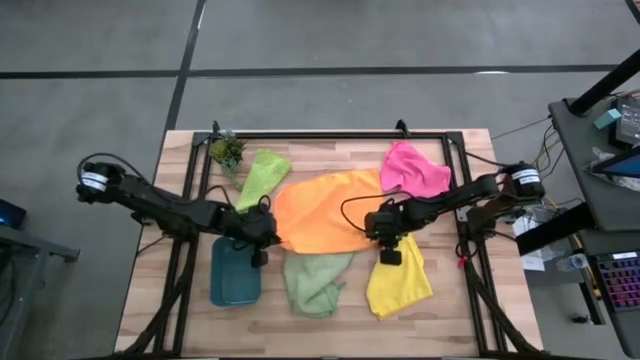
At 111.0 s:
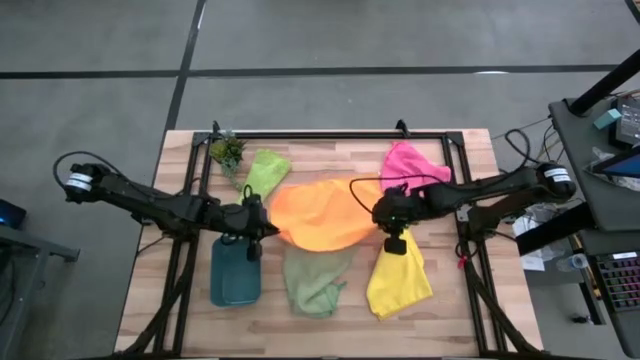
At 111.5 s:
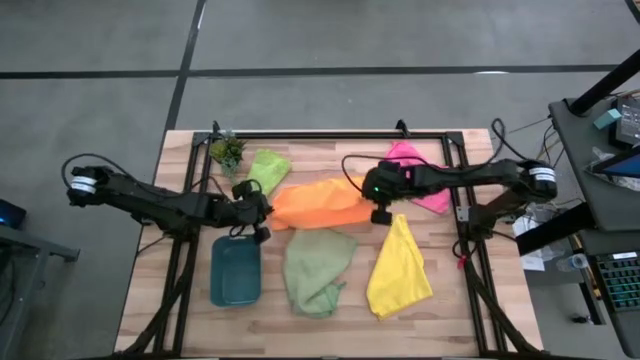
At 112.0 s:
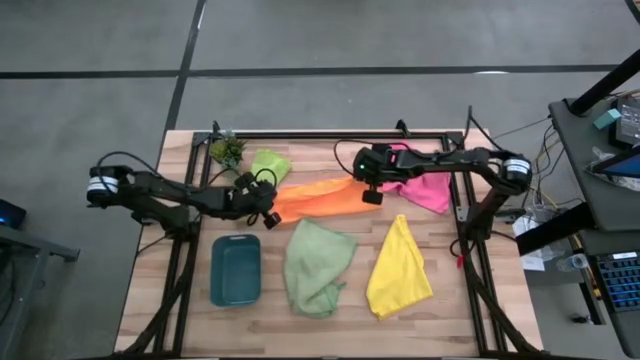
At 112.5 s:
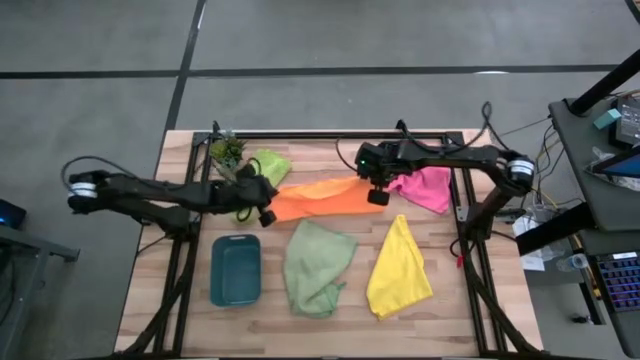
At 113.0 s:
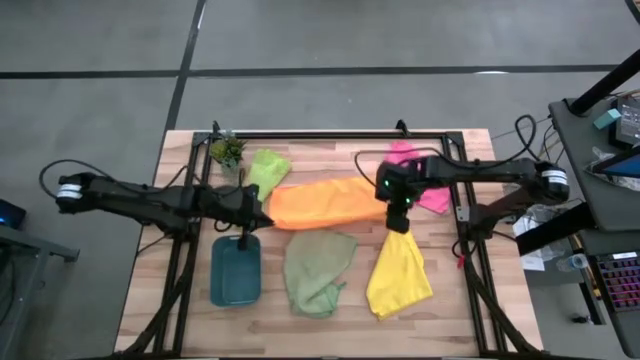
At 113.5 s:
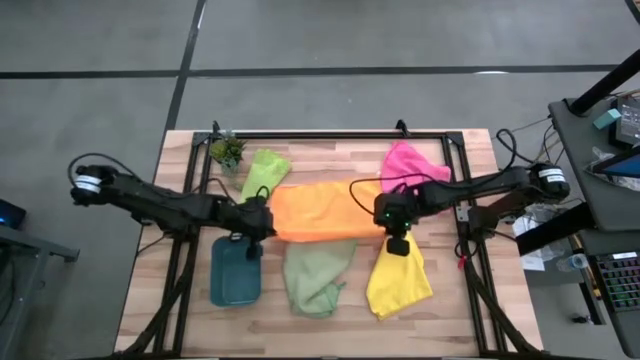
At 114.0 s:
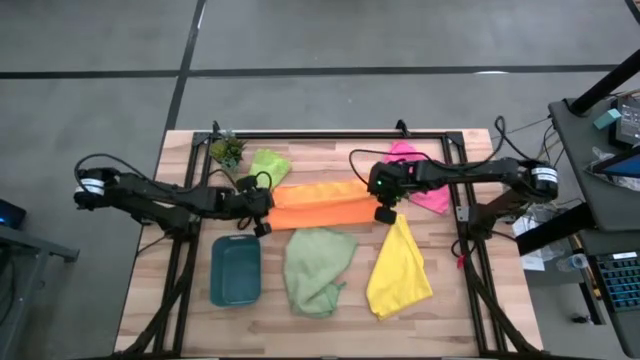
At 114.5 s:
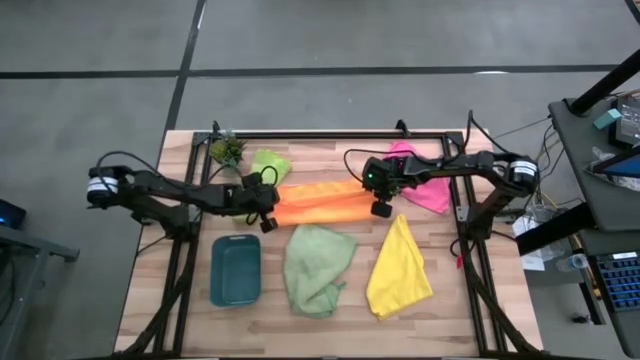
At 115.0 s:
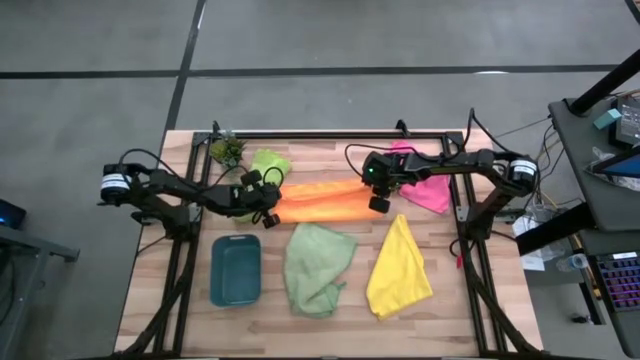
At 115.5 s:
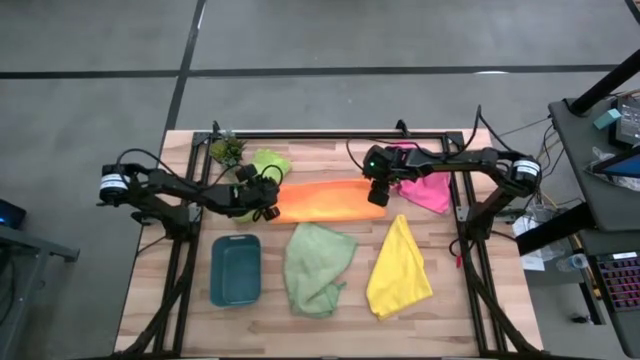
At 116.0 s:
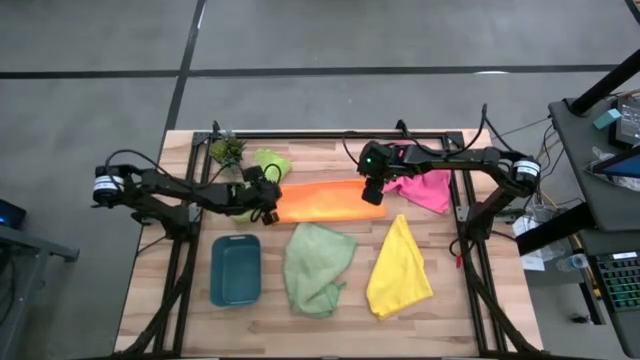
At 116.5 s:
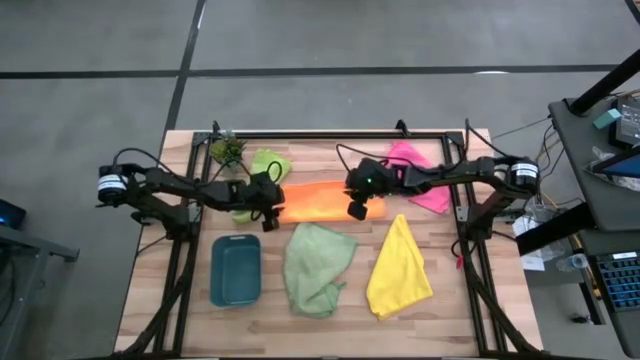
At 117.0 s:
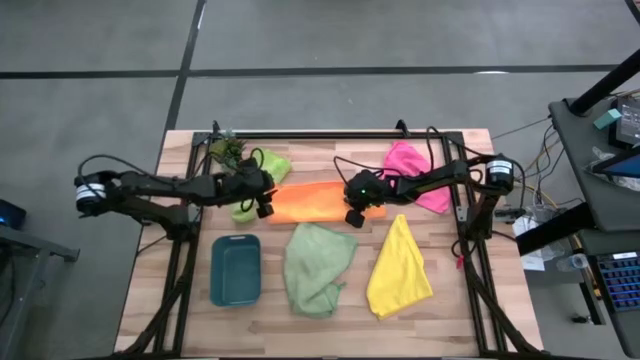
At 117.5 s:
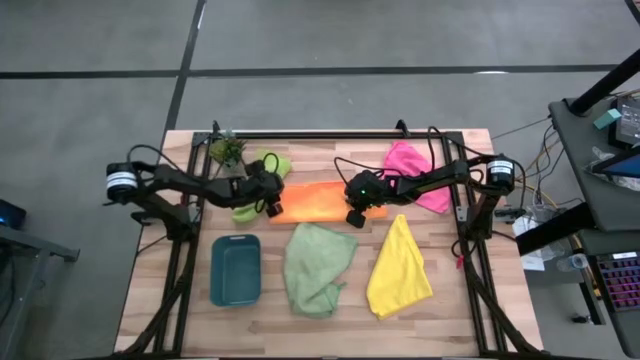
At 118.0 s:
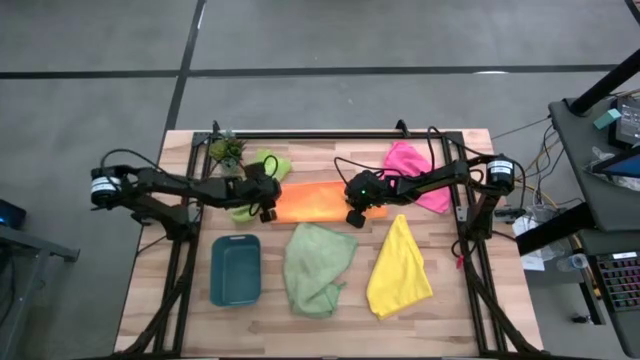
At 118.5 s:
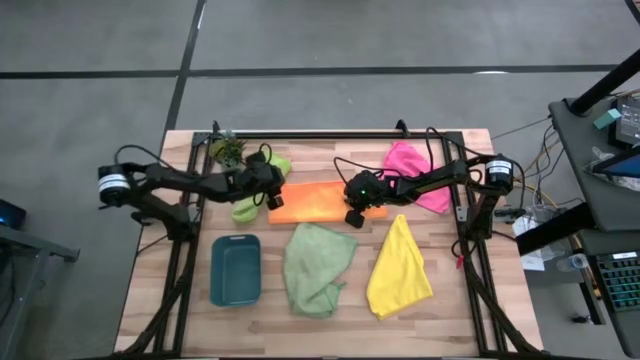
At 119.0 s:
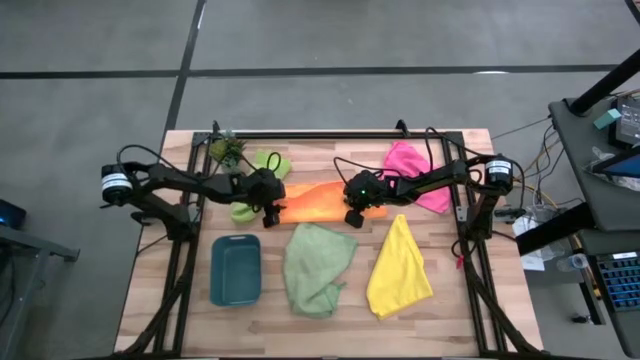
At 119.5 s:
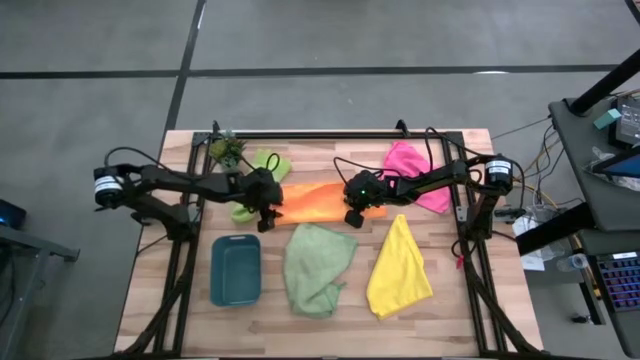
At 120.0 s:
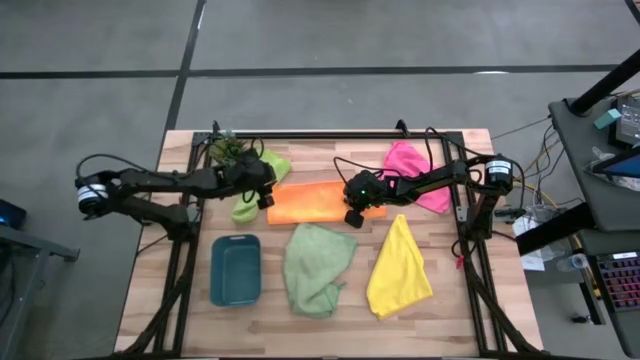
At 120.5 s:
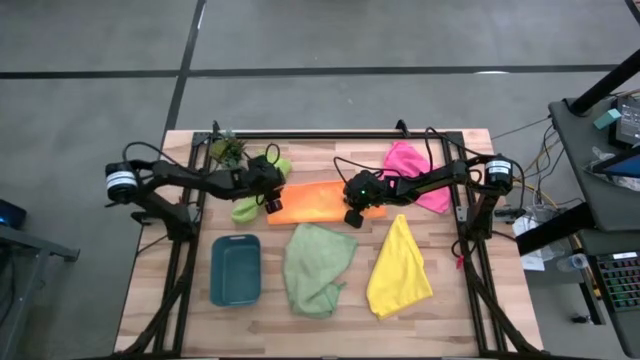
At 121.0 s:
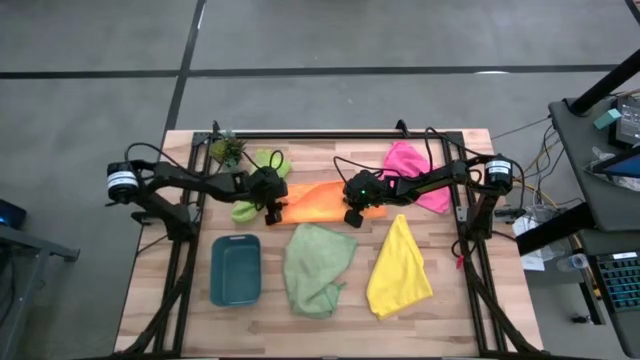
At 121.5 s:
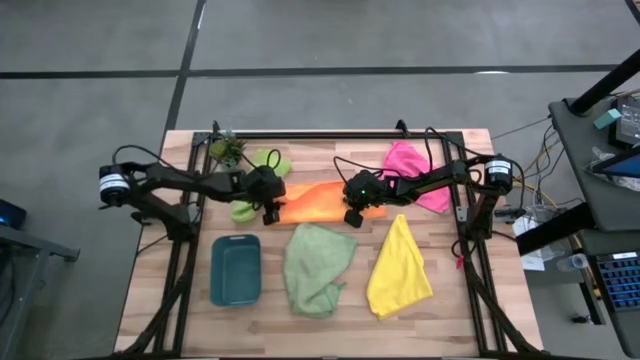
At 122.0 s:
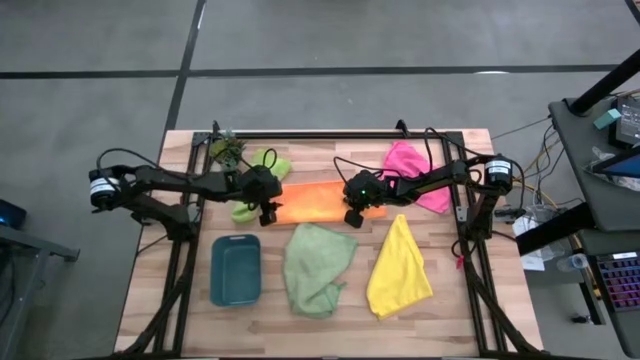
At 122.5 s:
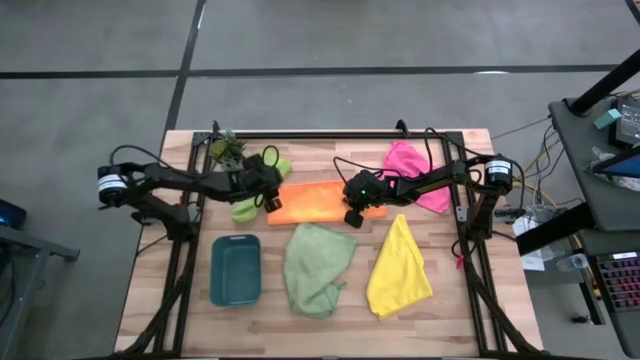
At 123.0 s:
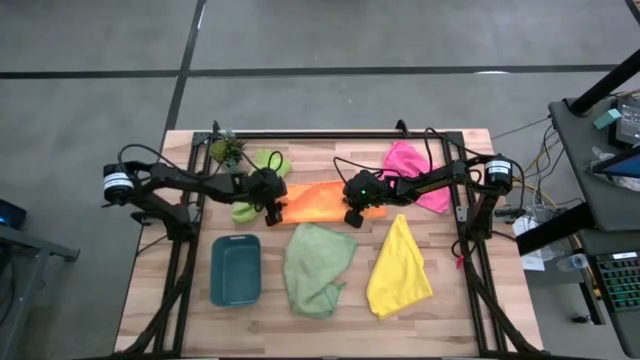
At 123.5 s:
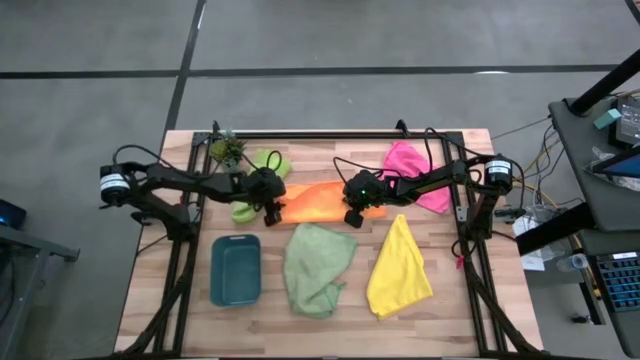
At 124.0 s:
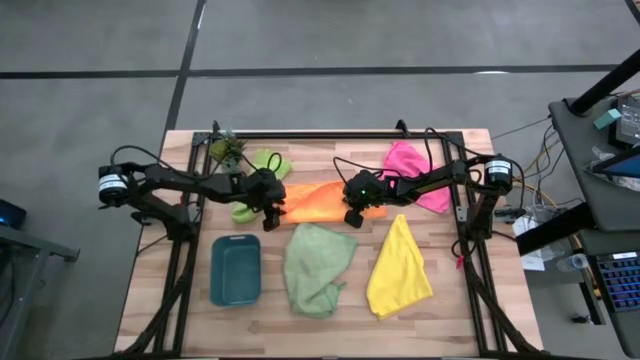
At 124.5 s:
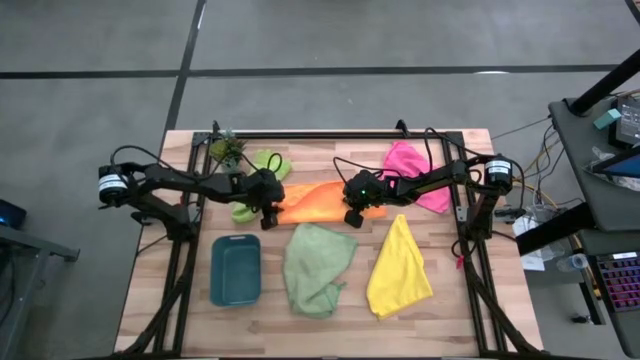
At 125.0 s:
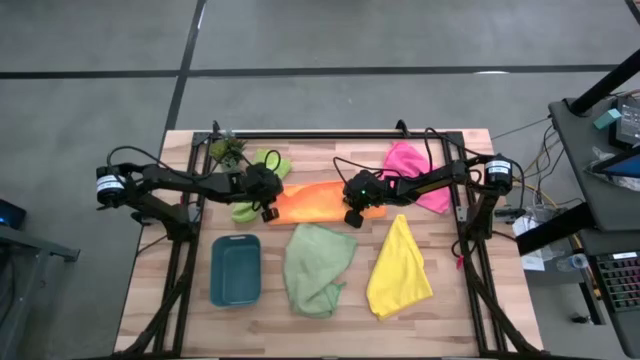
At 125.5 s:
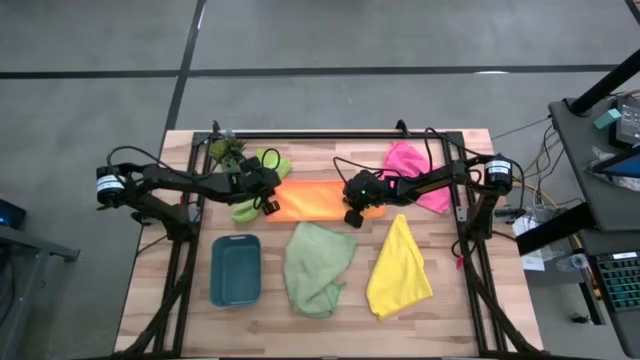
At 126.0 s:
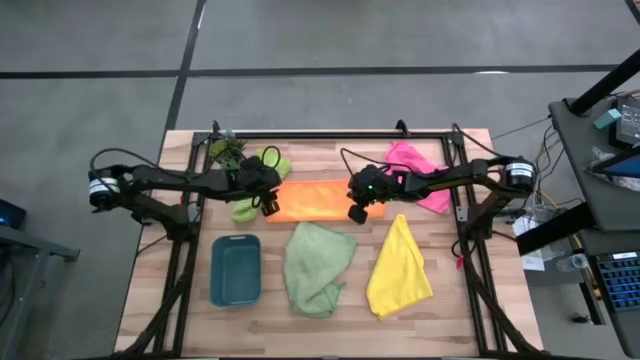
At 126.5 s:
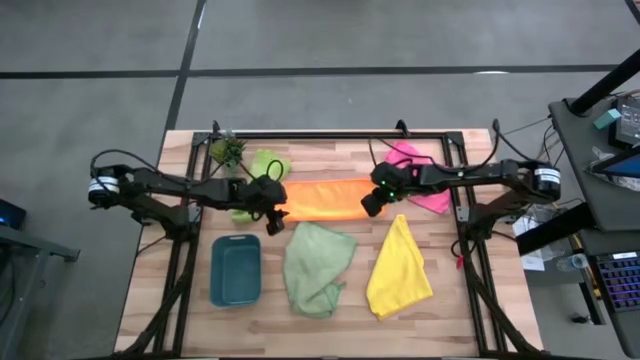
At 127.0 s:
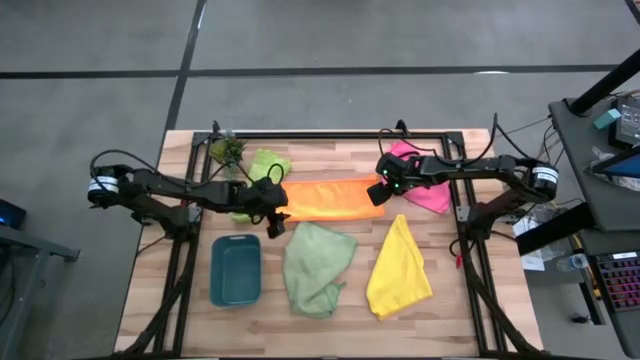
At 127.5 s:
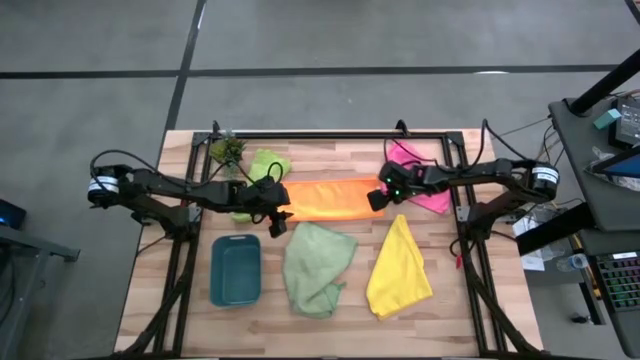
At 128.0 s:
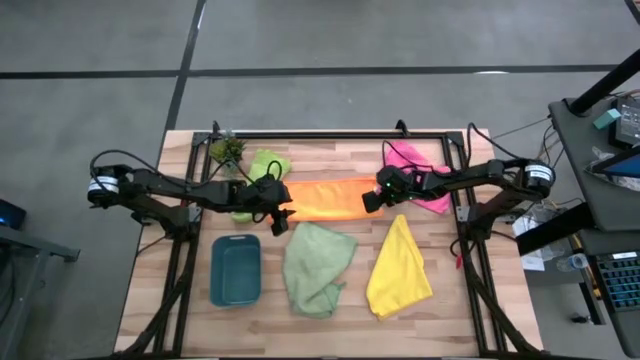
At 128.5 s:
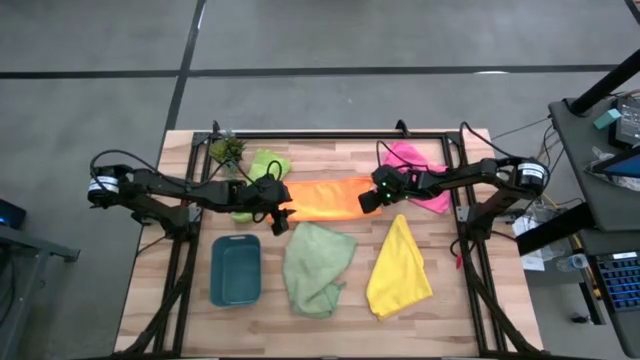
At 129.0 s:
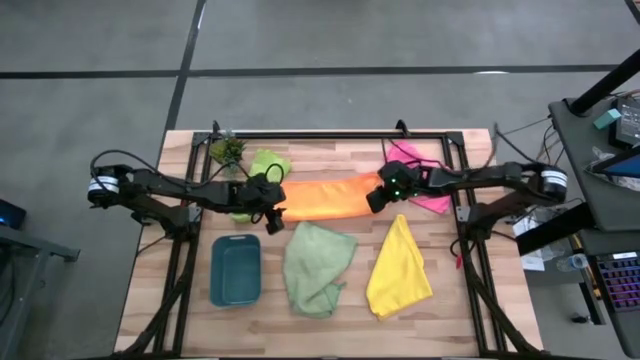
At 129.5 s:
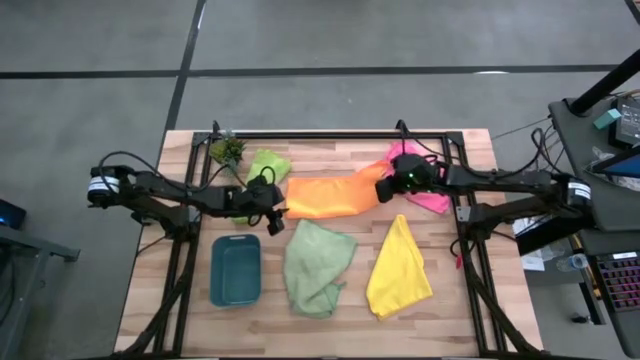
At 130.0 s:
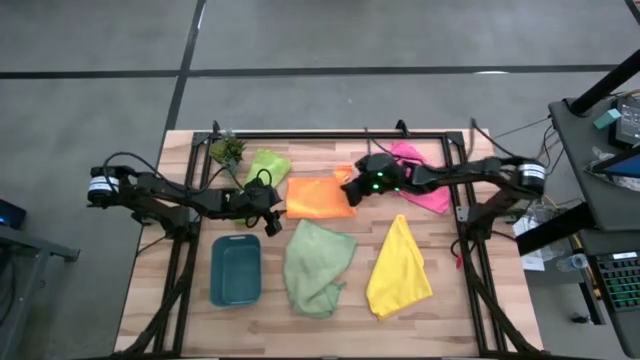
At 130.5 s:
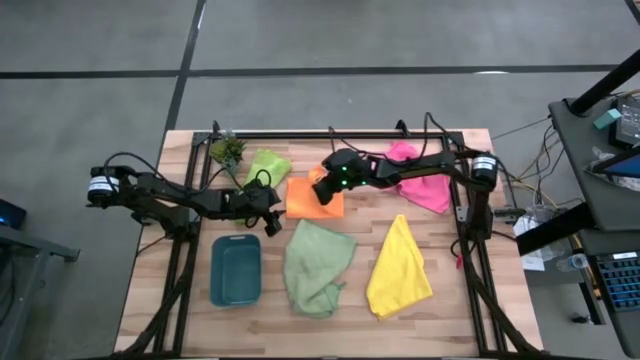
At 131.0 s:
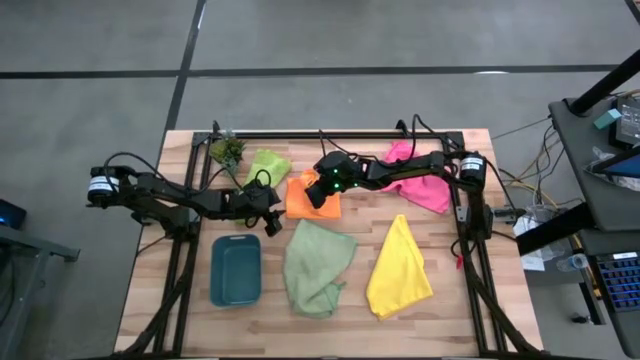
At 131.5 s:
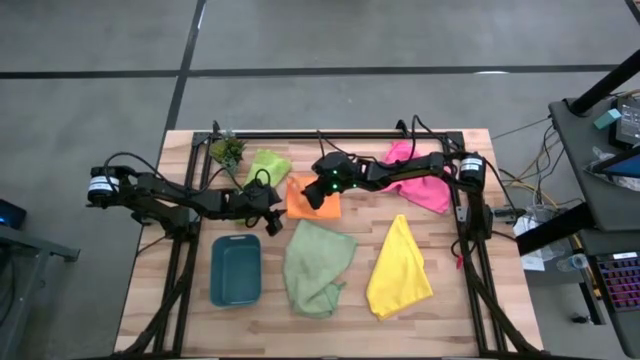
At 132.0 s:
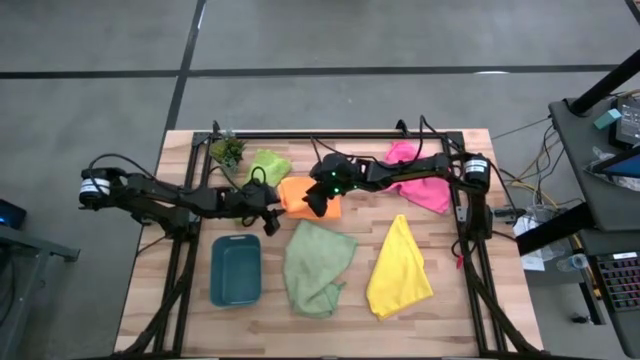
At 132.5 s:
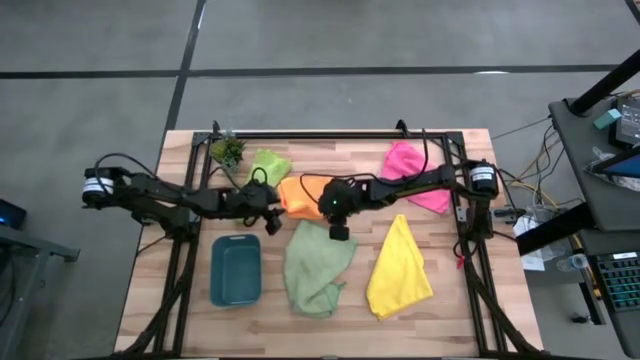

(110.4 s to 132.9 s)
Task: Fold microfiber towels
Fold the orange microfiber cloth
